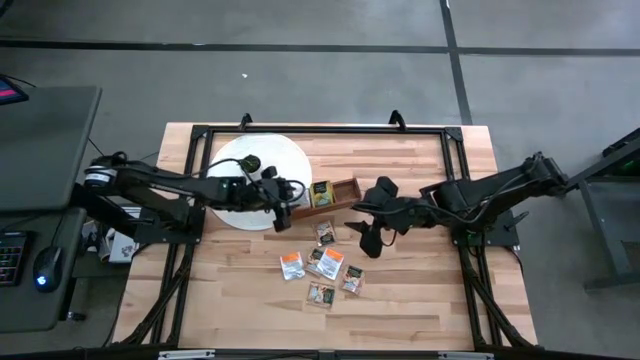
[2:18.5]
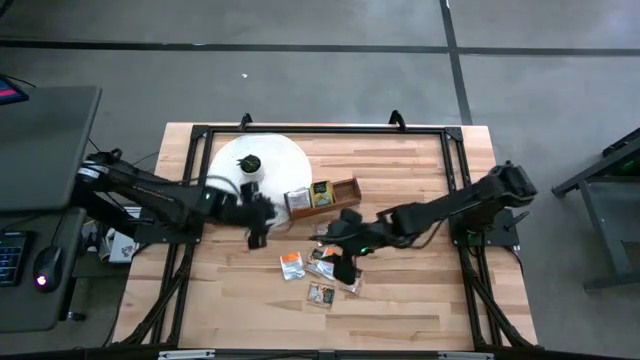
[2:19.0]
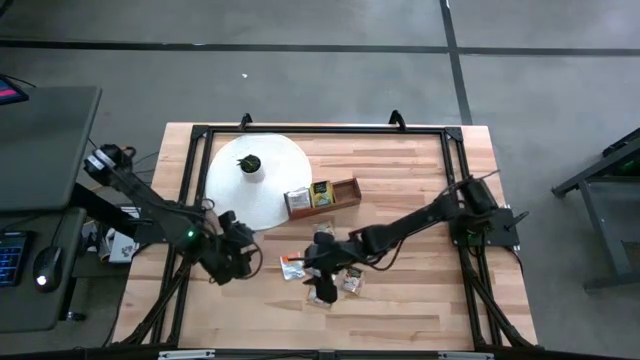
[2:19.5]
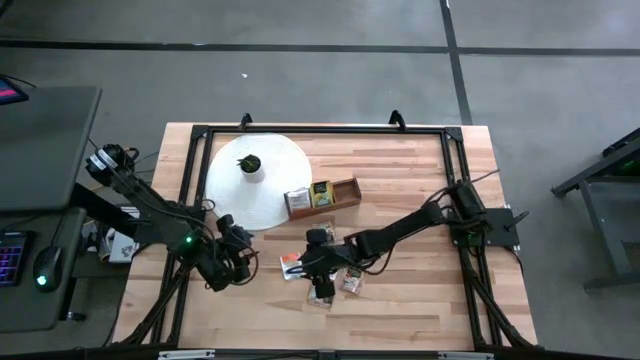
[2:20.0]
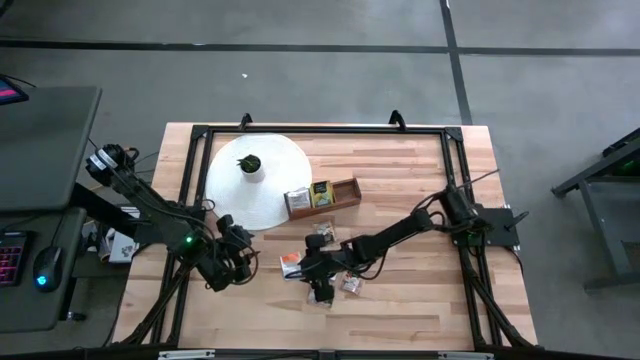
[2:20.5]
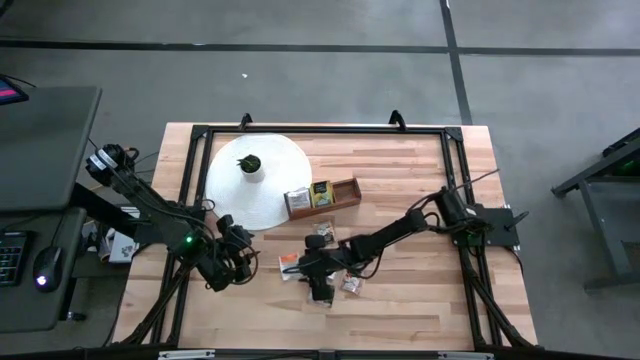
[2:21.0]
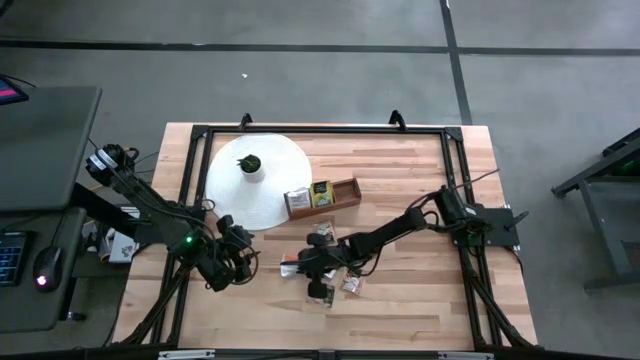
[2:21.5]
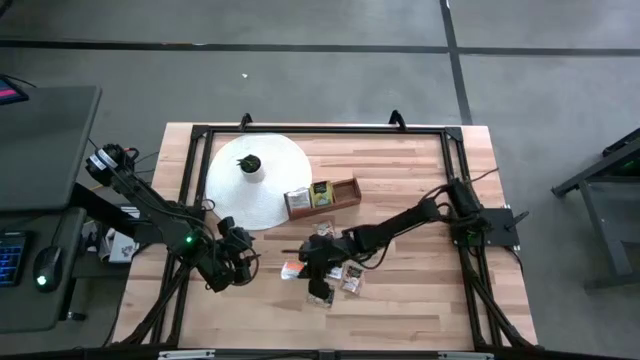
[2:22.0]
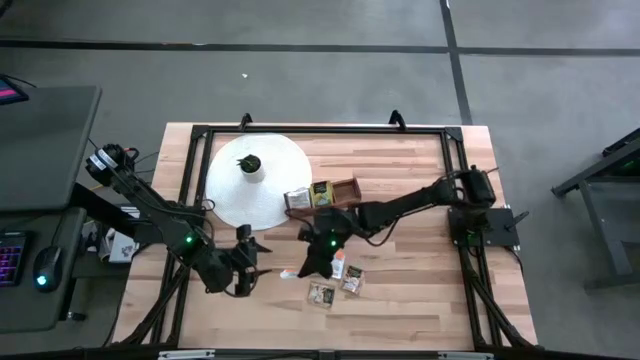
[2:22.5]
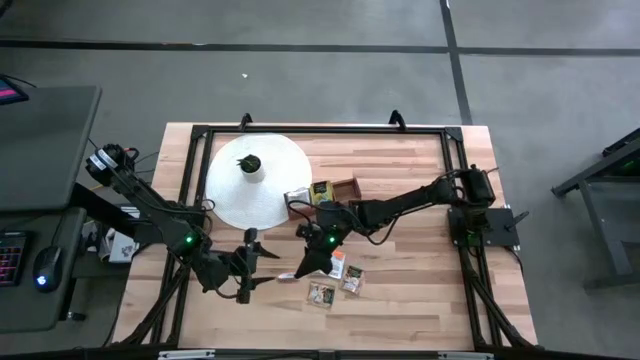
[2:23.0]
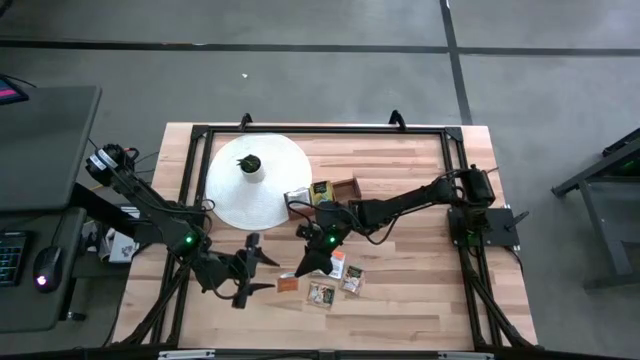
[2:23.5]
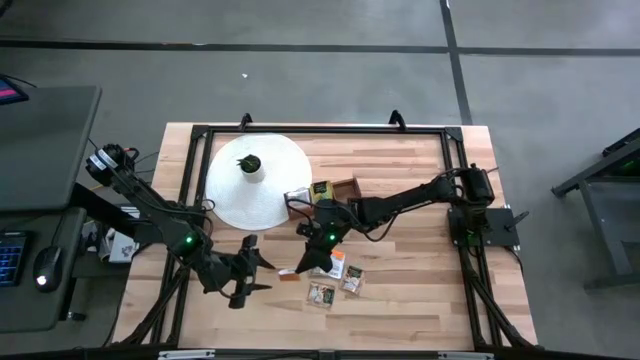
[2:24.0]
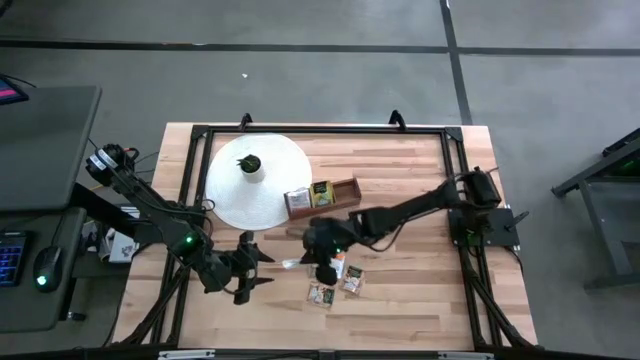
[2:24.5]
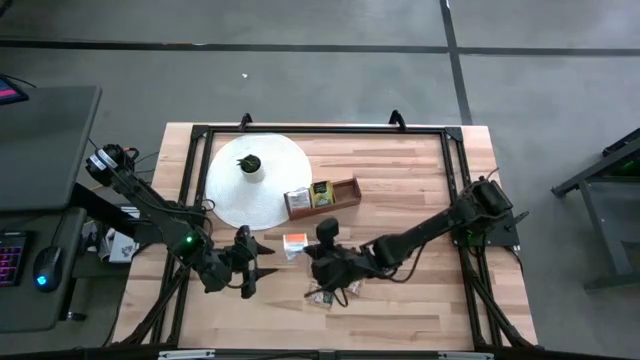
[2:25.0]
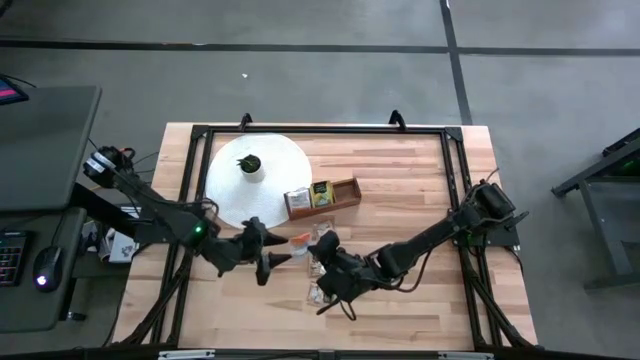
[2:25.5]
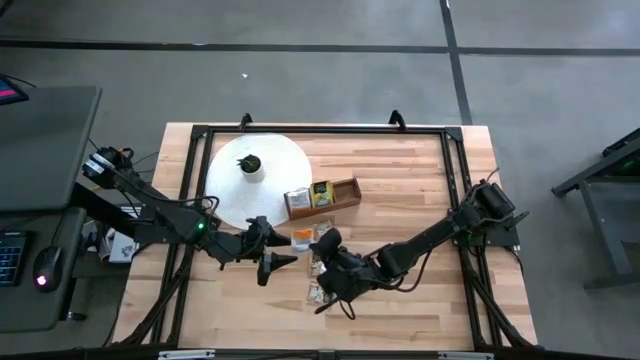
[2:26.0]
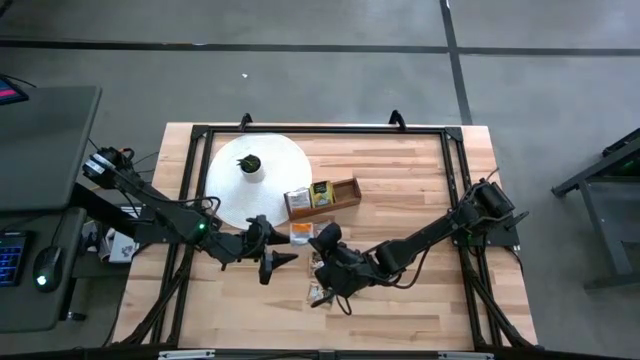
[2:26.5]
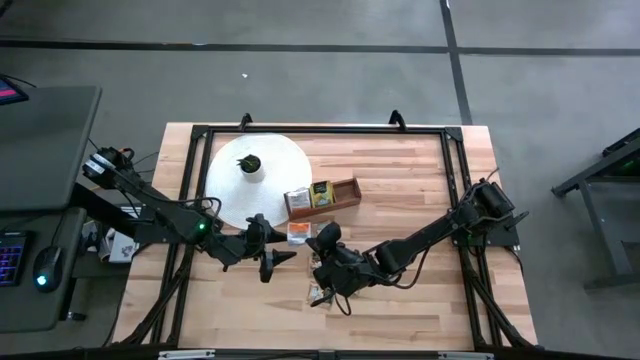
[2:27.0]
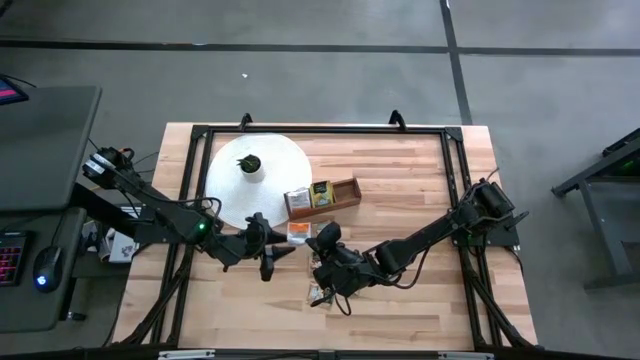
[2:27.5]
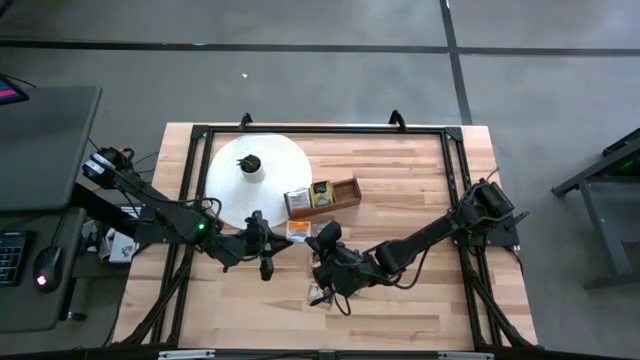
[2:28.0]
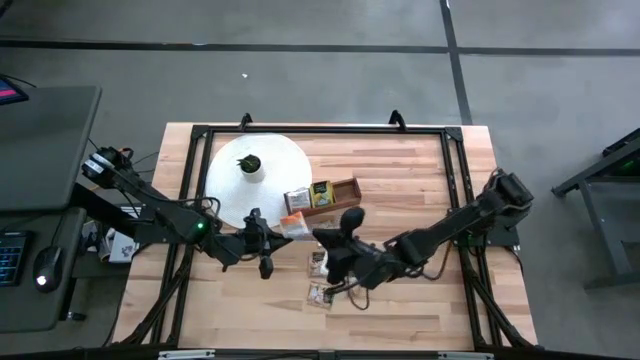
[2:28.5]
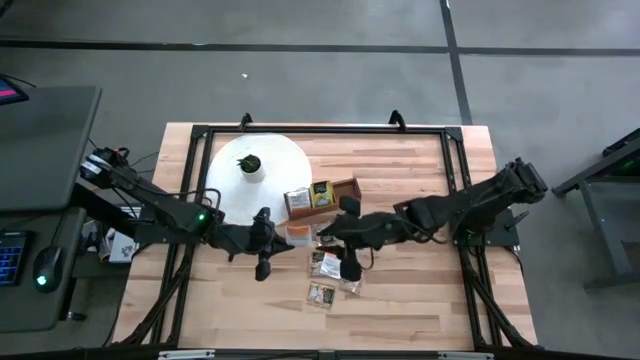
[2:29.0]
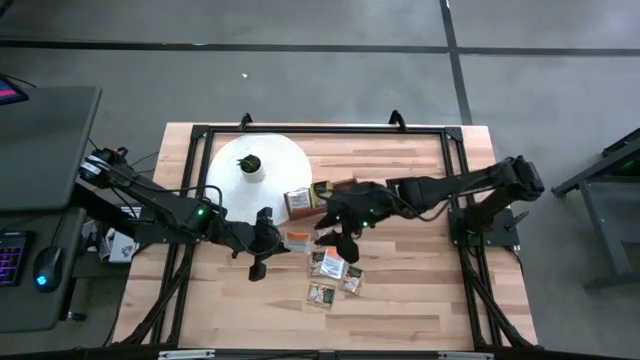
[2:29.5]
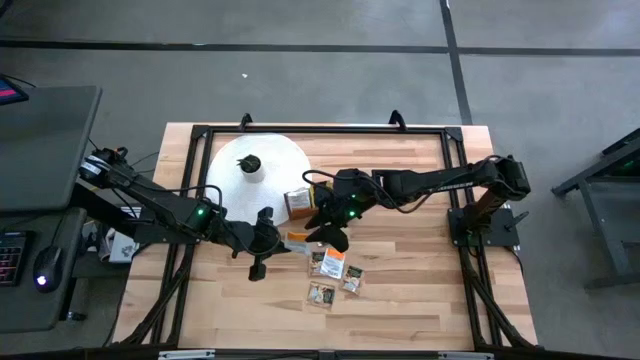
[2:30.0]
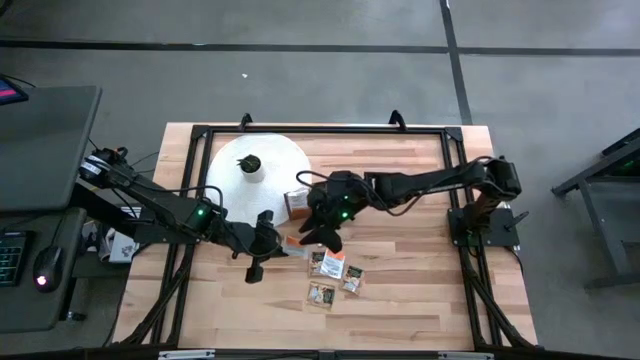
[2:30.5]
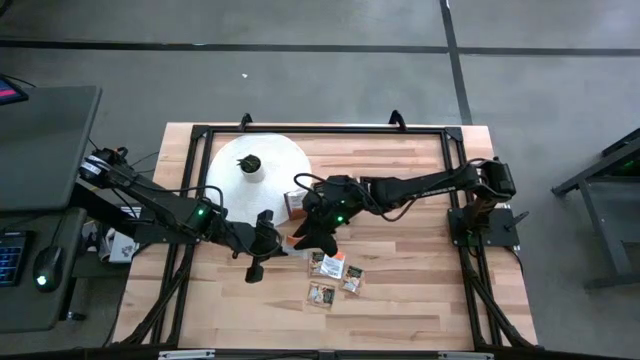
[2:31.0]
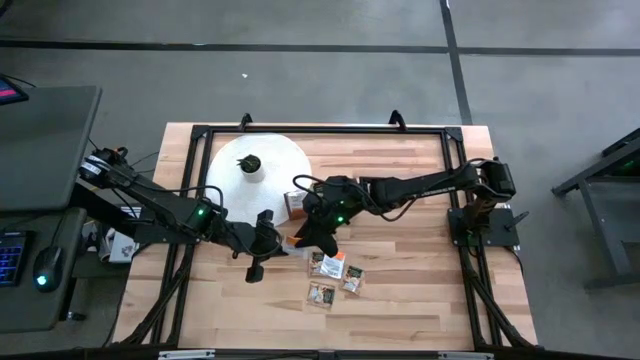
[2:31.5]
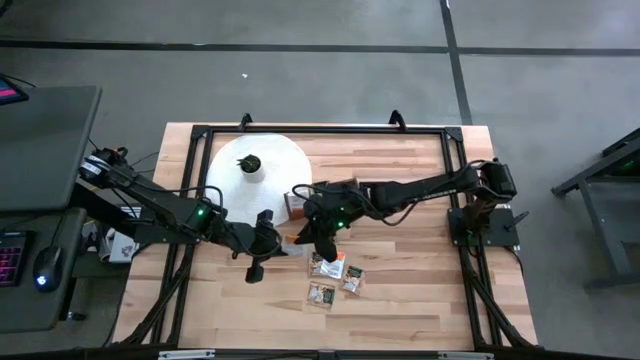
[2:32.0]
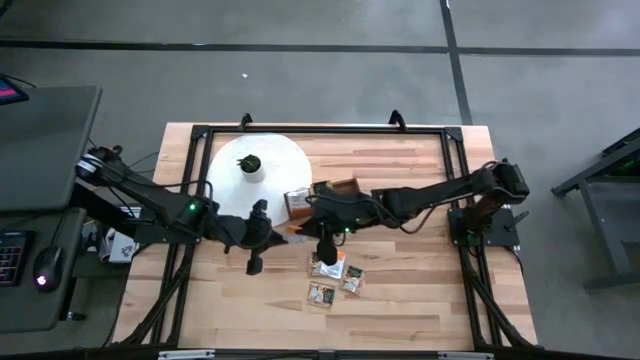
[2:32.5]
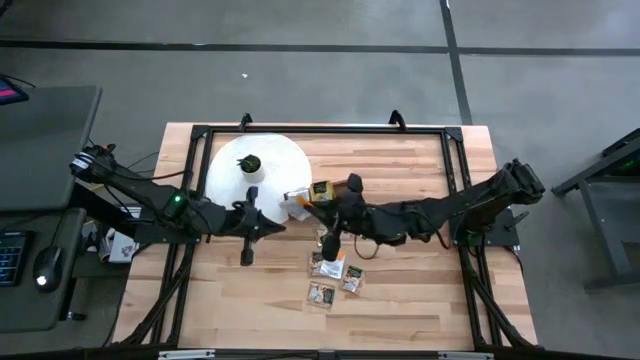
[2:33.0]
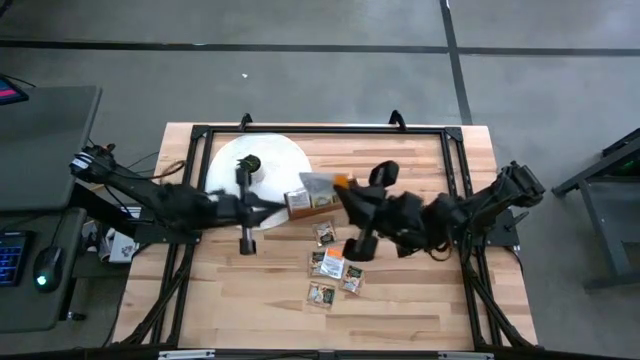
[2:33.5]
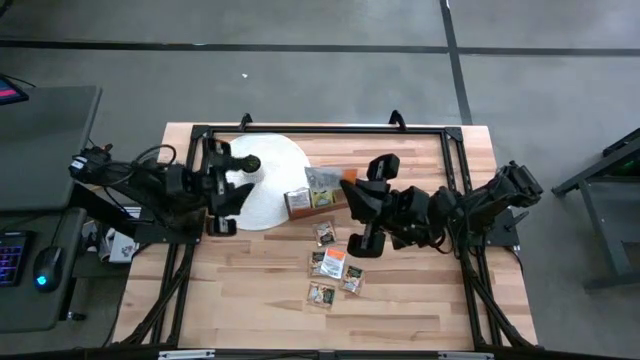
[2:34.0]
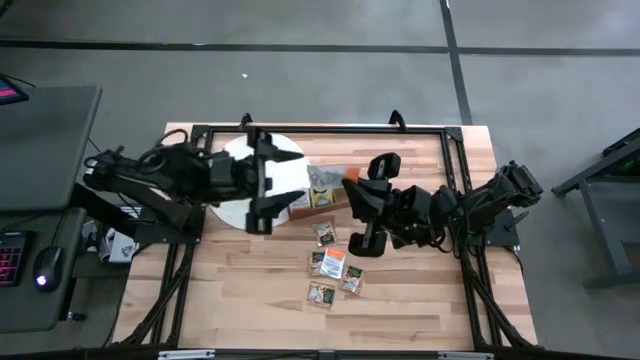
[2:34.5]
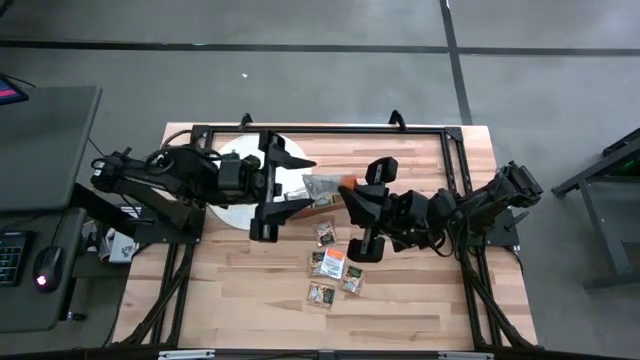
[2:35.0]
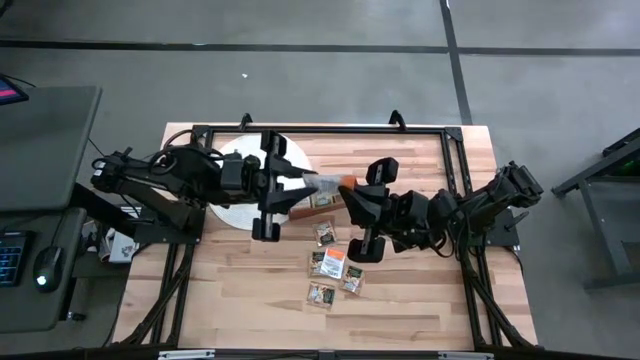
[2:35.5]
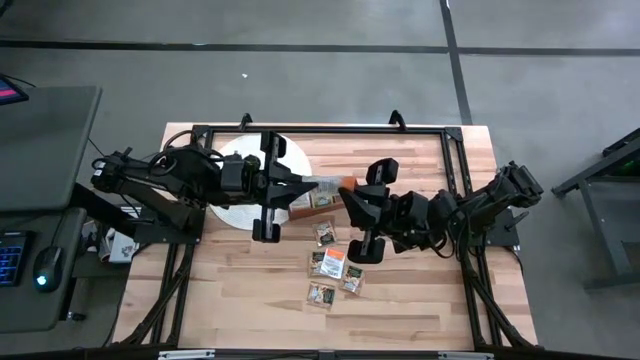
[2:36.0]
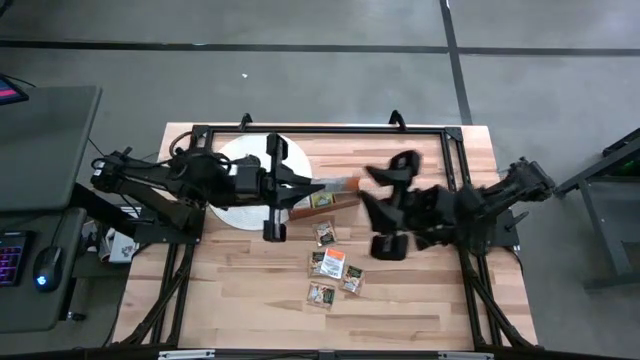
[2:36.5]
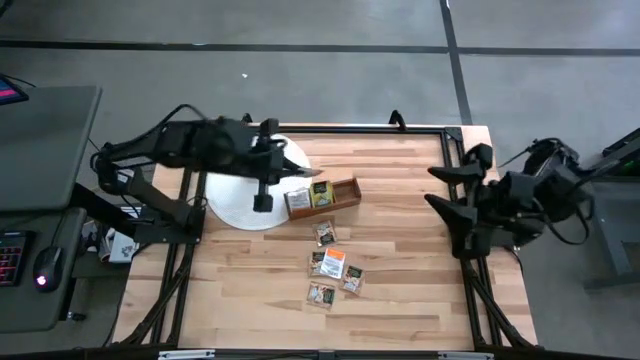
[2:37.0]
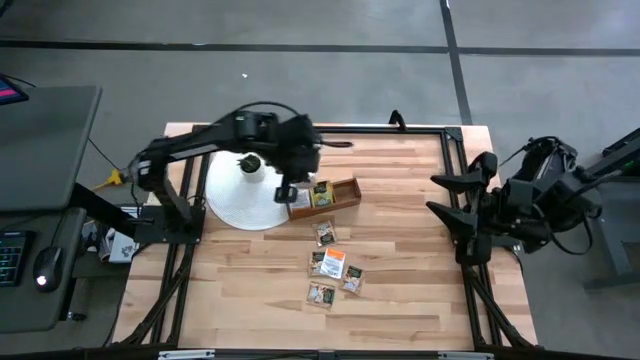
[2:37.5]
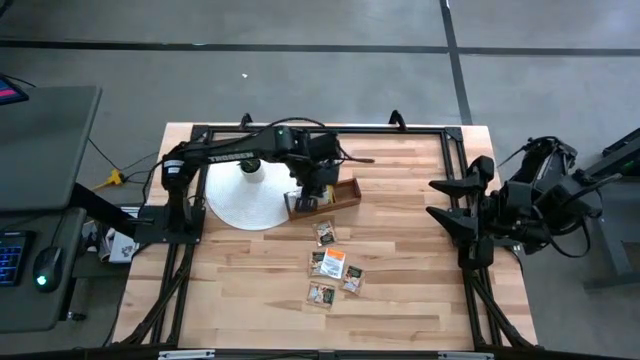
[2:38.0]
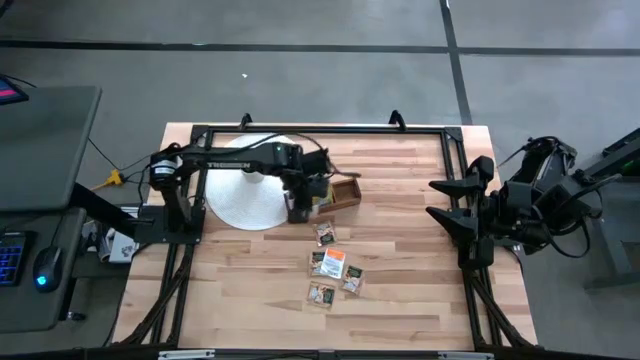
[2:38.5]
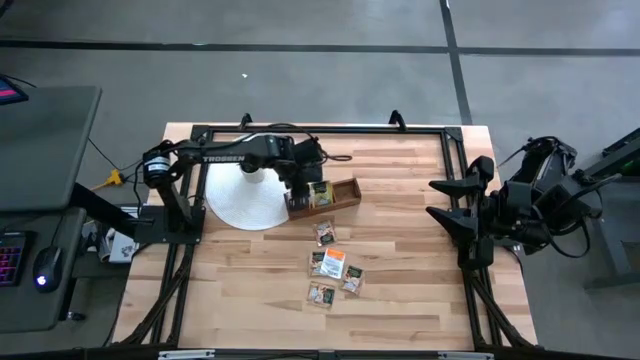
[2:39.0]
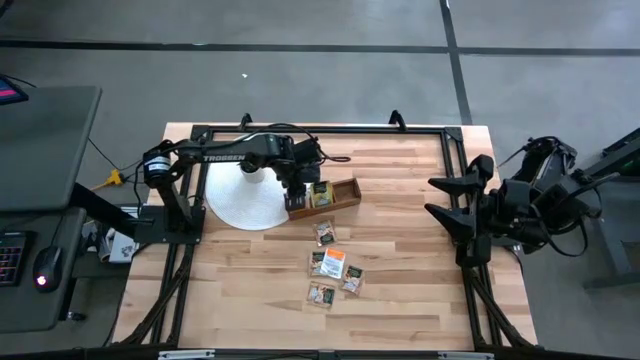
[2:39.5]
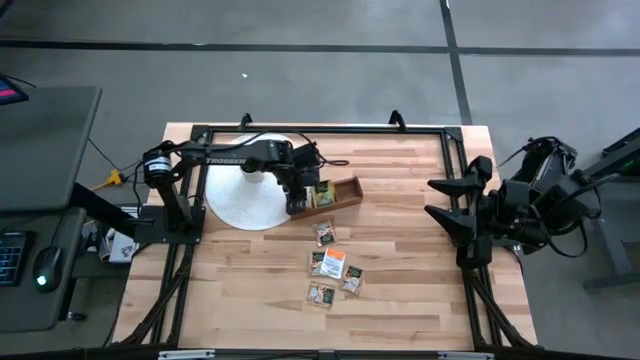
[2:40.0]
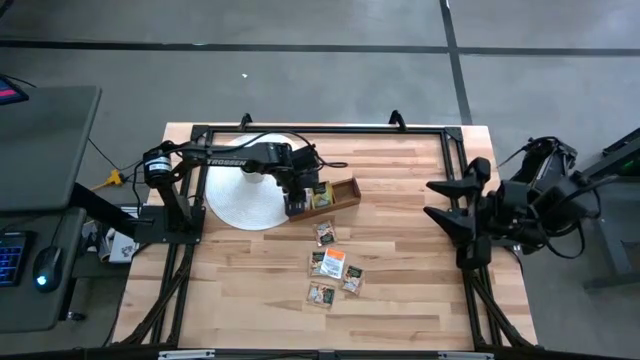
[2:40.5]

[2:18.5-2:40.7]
Task: Pick & Place Tea
Put the white tea bag into the left section of the wooden organizer
